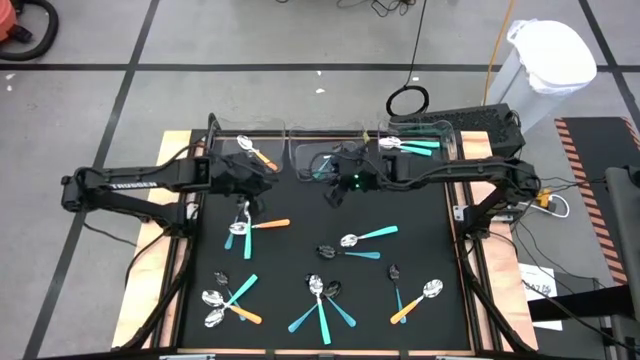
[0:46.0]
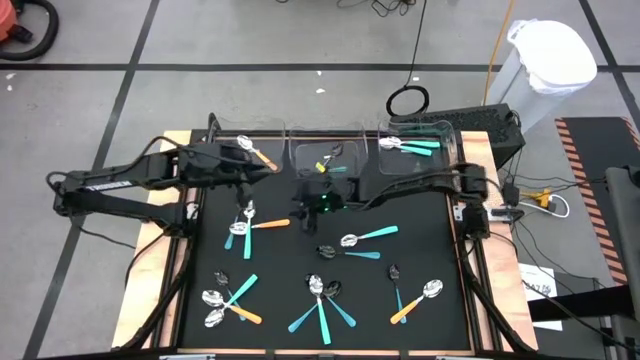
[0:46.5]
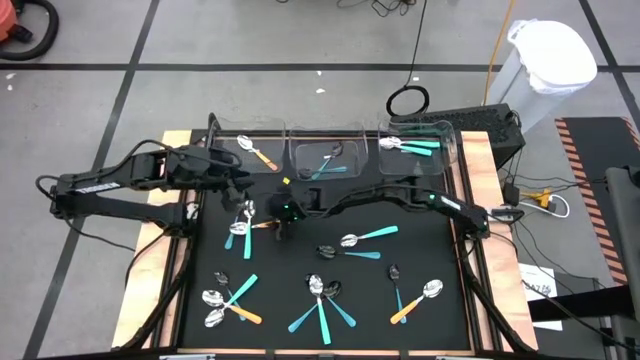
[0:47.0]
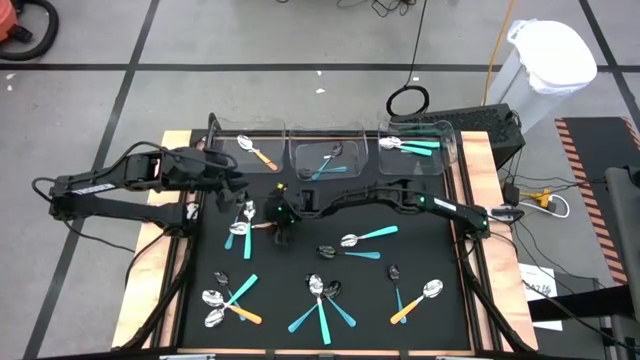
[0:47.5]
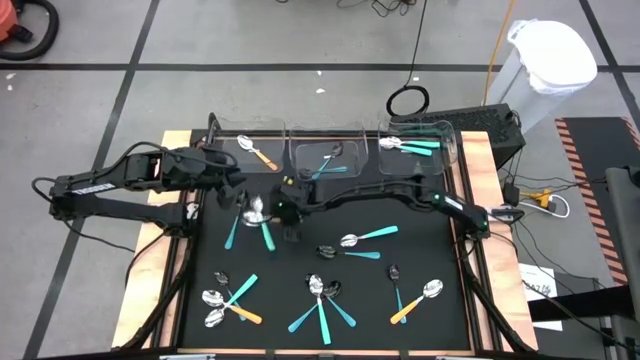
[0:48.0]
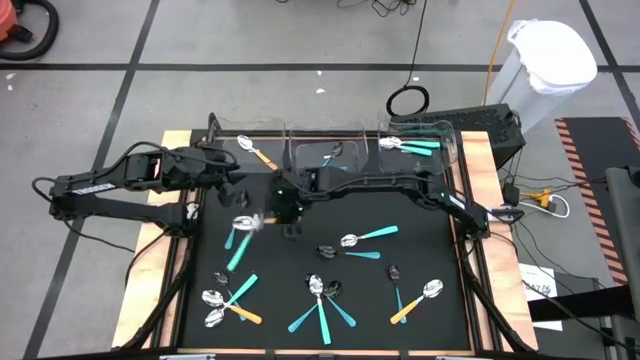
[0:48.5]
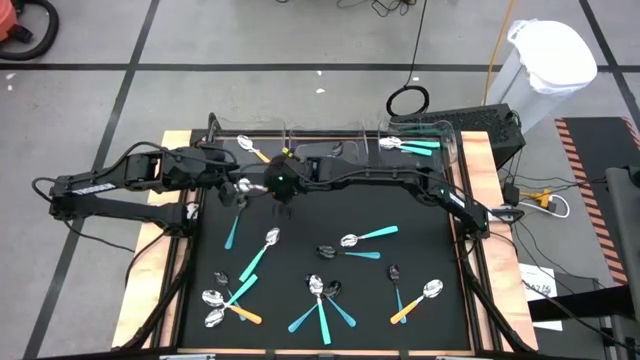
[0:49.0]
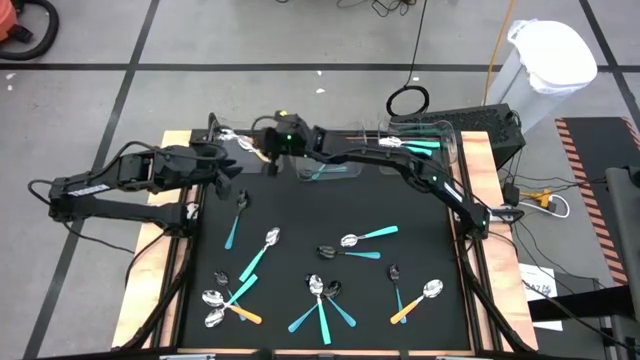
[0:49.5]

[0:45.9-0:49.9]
Task: Sort silverware by color (type)
Put the yellow spoon into the left transparent bin

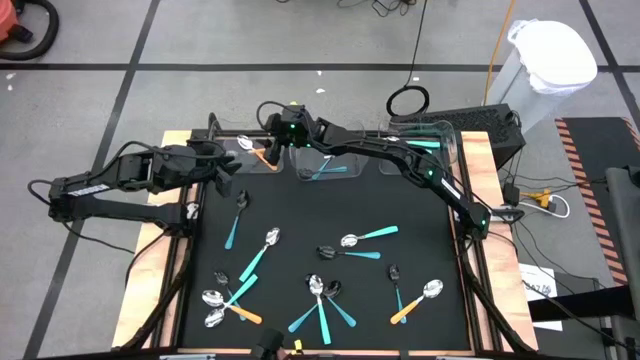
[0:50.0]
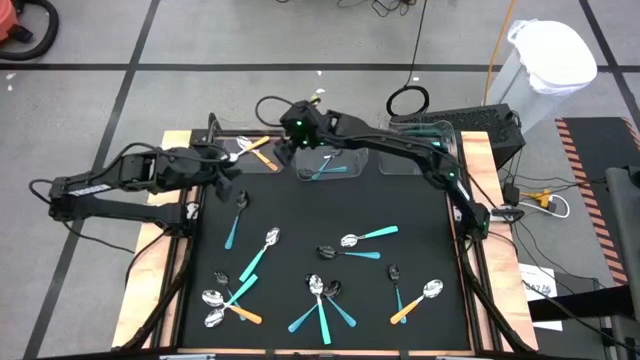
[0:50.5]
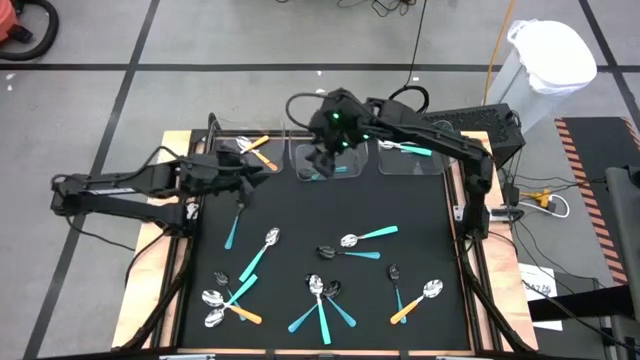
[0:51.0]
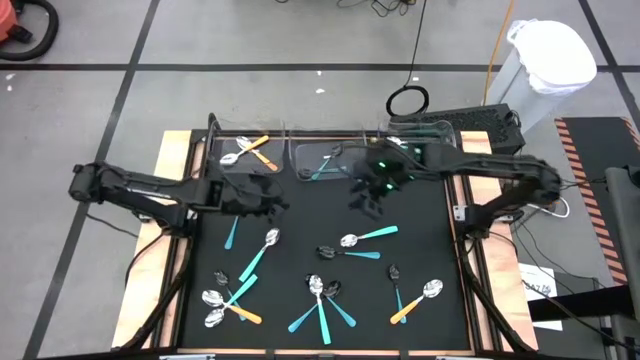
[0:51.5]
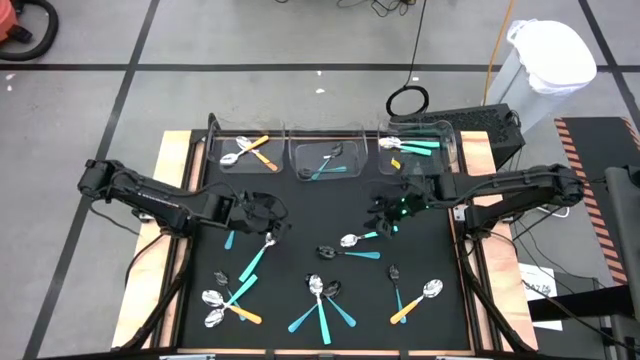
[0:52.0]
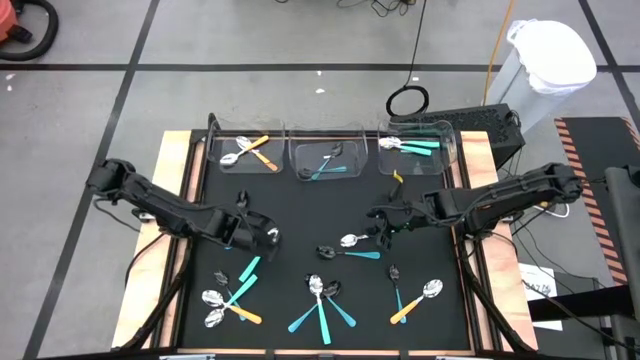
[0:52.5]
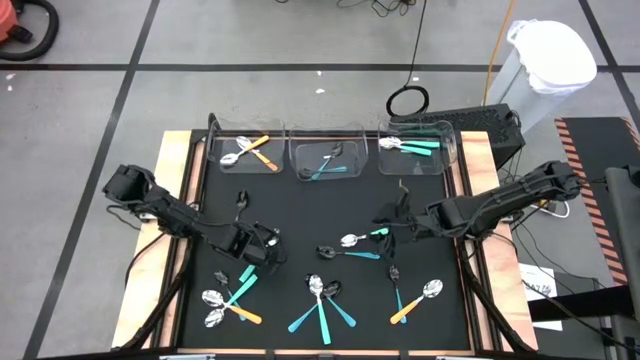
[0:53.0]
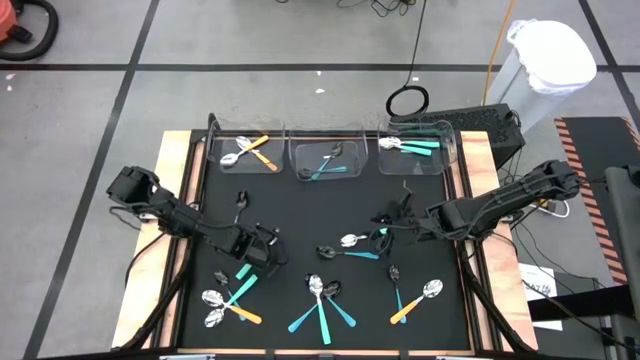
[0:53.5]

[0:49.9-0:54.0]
Put the light green spoon into the right transparent bin

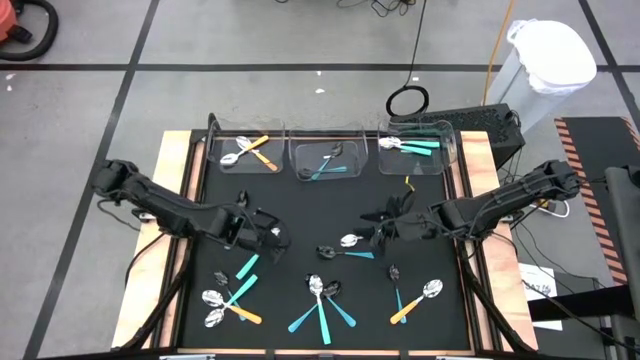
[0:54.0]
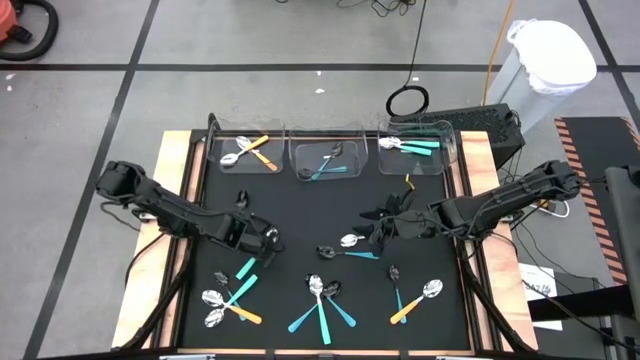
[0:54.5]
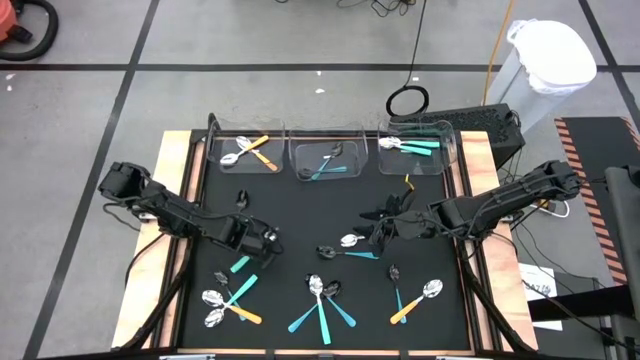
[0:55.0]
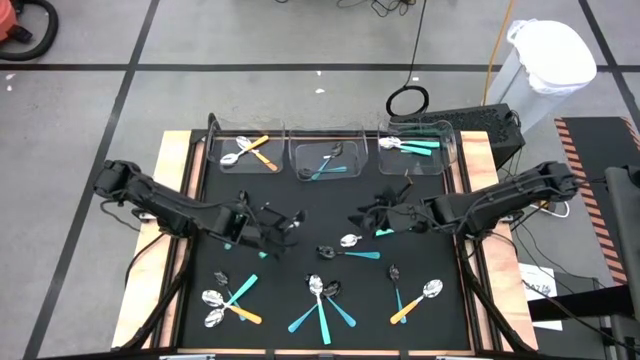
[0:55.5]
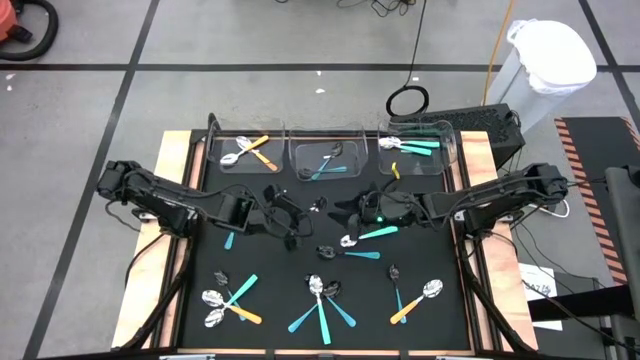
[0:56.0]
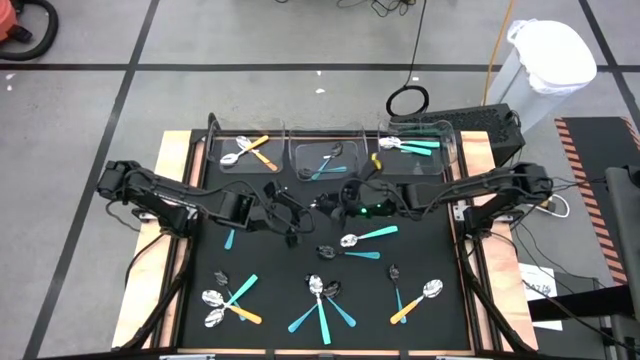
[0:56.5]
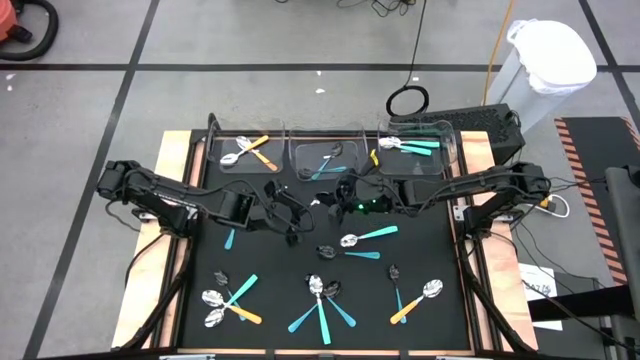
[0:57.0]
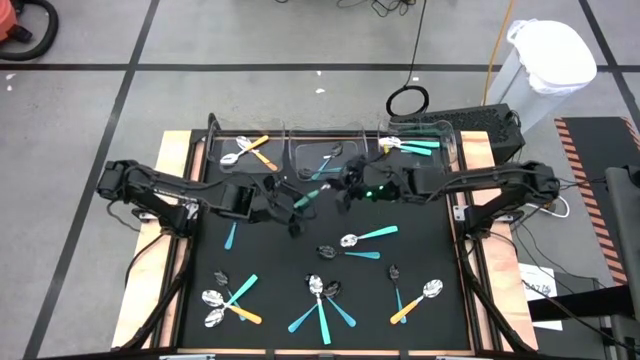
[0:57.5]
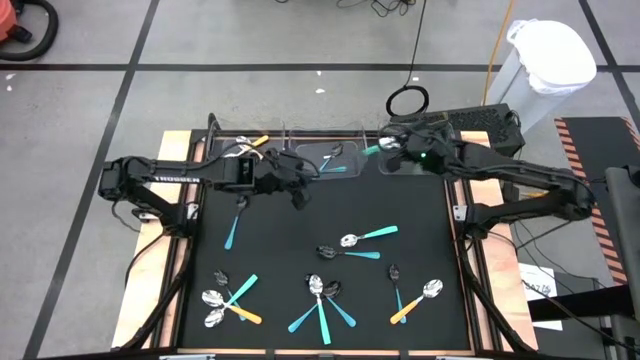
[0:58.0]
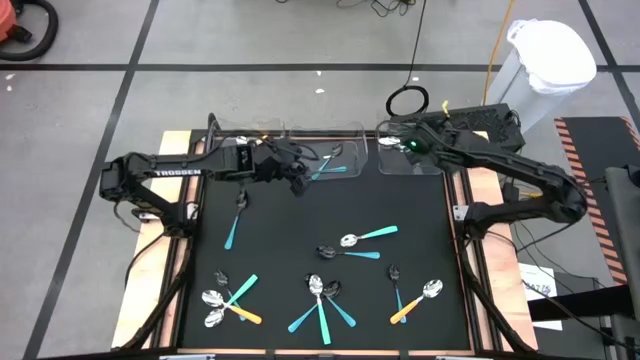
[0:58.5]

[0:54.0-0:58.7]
Put the light green spoon into the right transparent bin

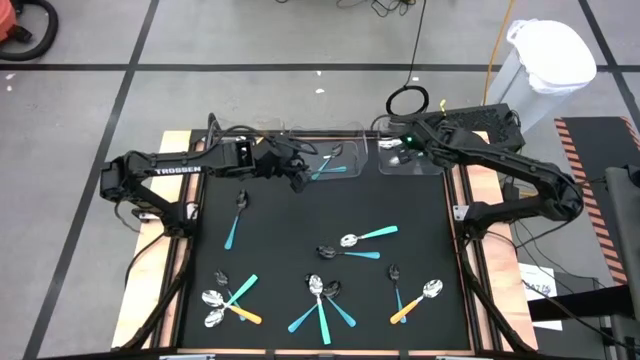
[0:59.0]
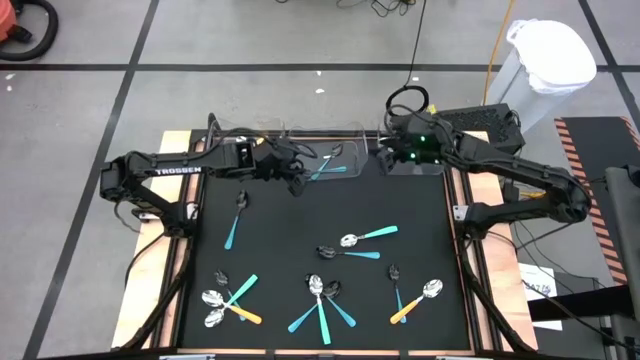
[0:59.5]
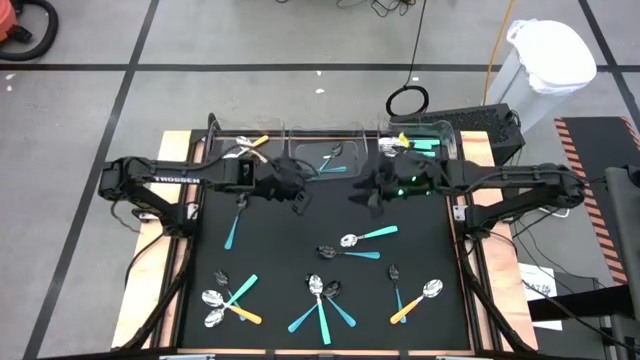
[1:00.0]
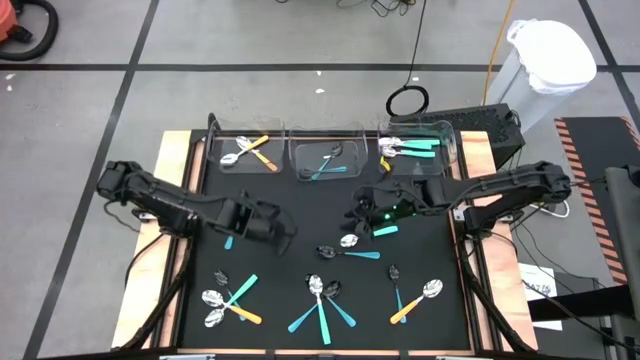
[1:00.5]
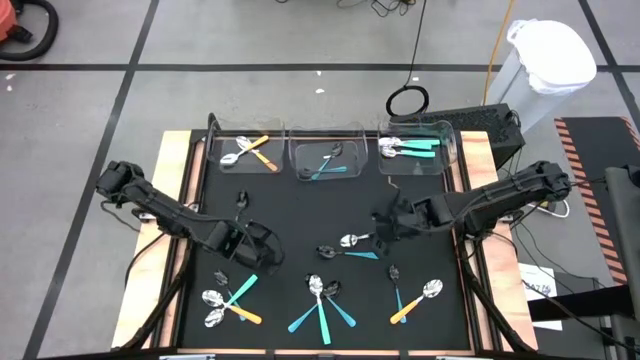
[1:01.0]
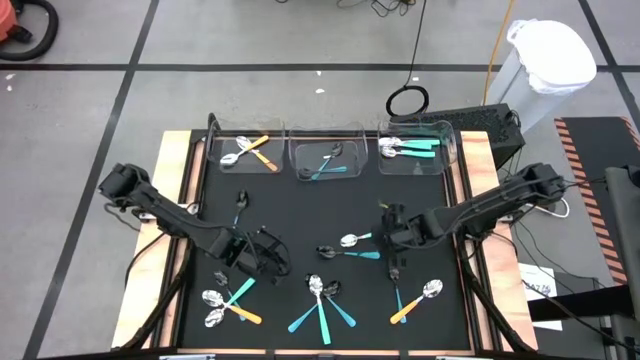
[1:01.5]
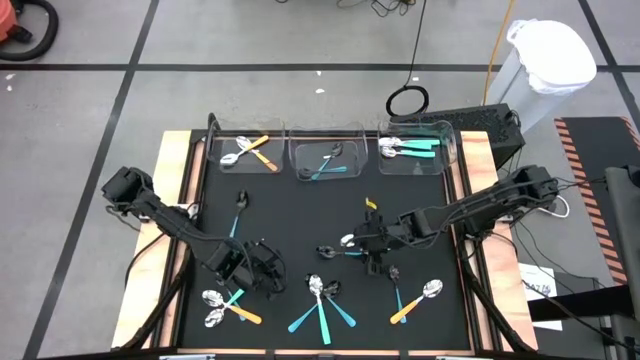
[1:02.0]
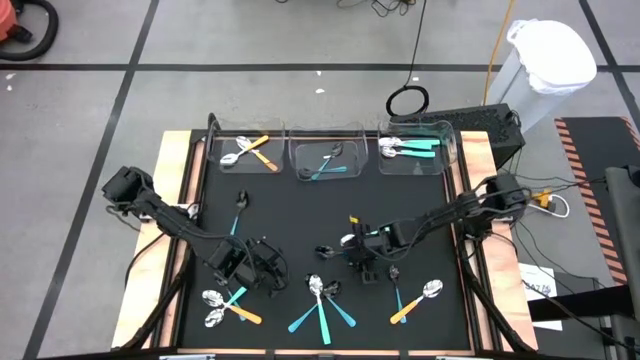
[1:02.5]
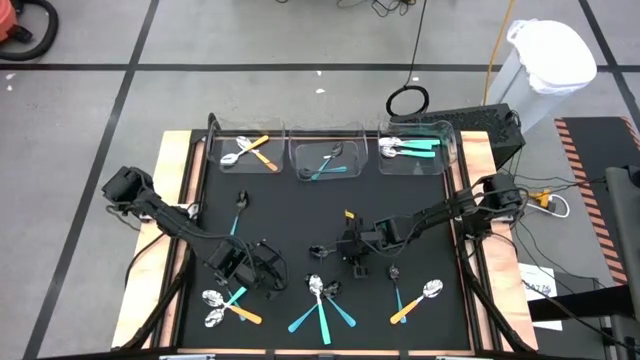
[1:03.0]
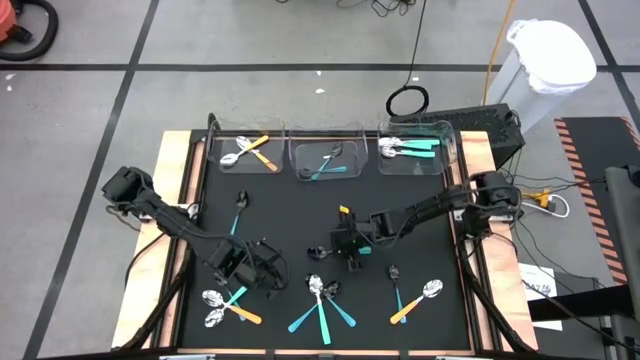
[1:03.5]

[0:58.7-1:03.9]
Put the light blue spoon into the middle transparent bin

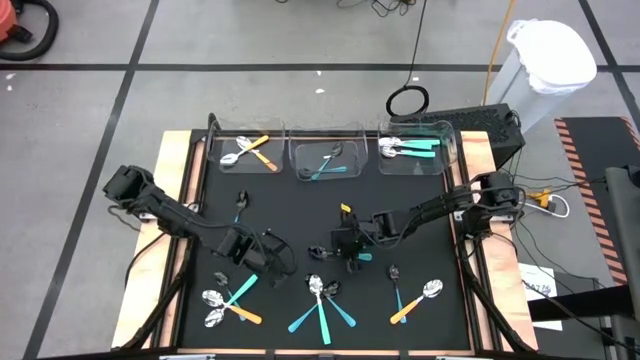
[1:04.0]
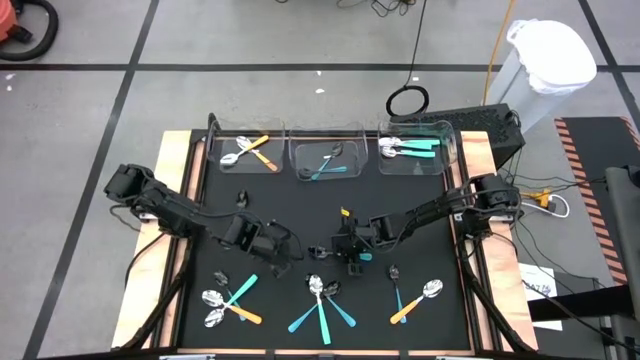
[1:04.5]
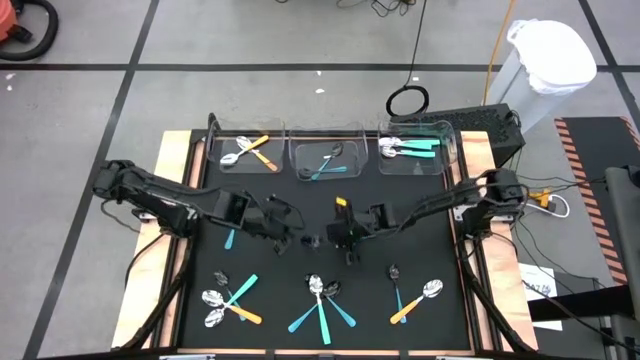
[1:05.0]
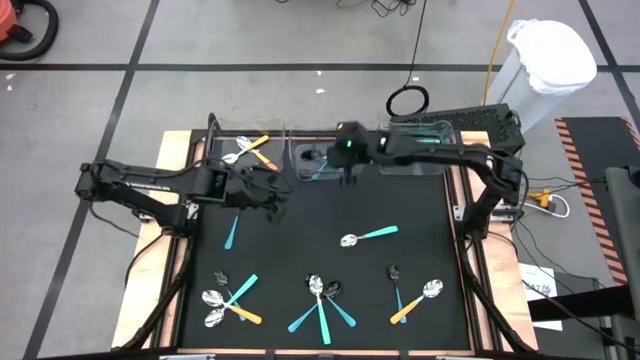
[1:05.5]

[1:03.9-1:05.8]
Put the light blue spoon into the middle transparent bin
